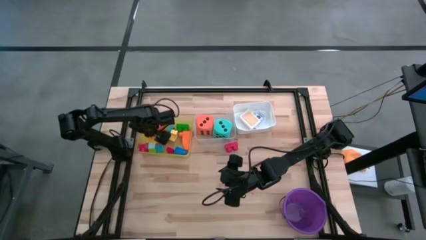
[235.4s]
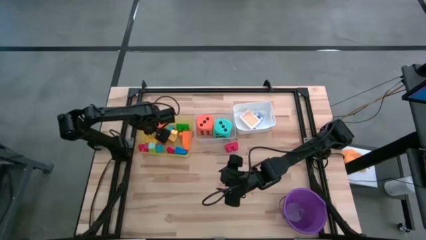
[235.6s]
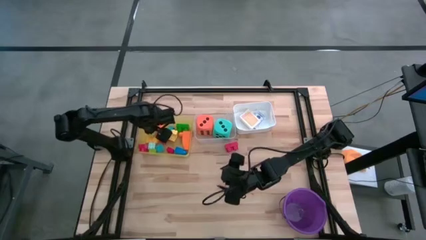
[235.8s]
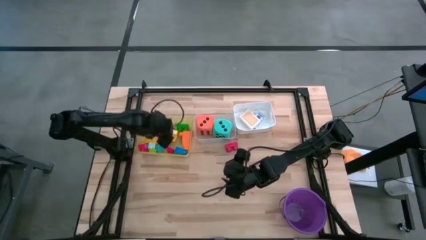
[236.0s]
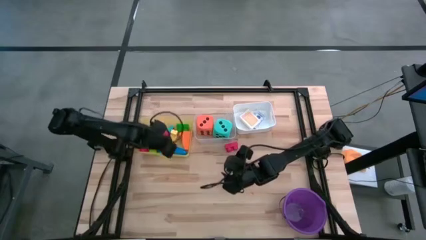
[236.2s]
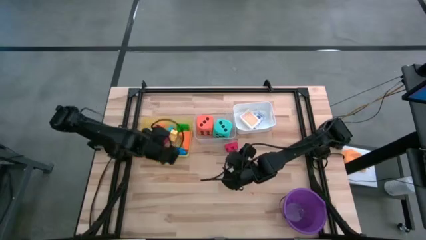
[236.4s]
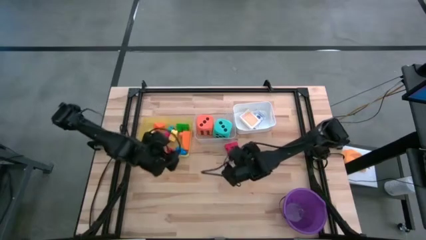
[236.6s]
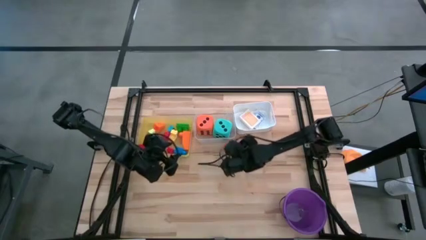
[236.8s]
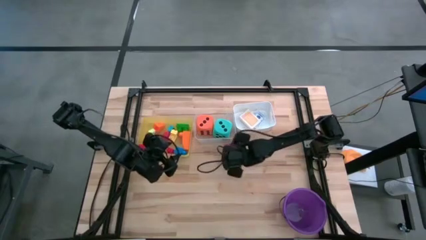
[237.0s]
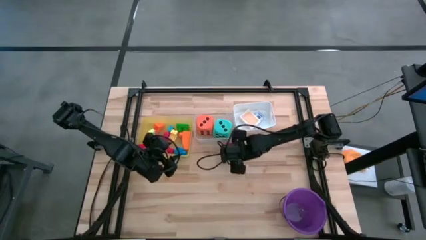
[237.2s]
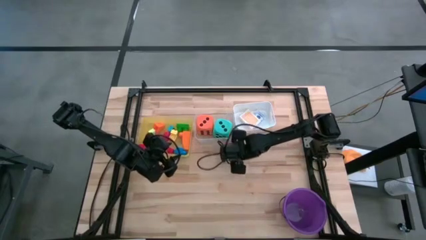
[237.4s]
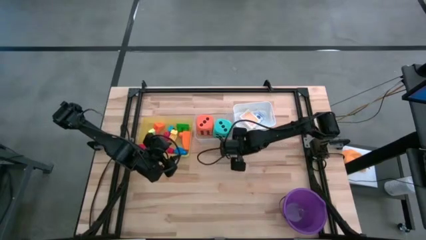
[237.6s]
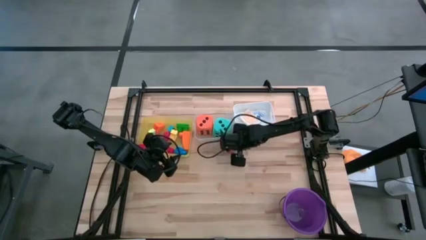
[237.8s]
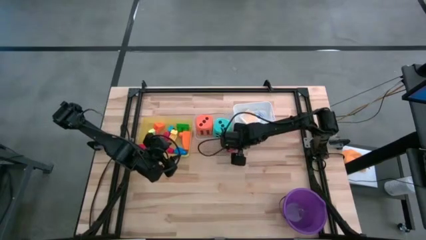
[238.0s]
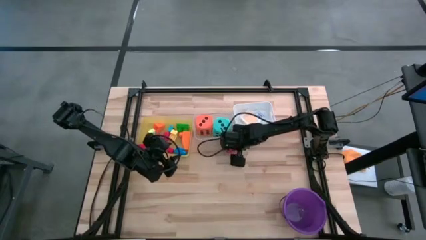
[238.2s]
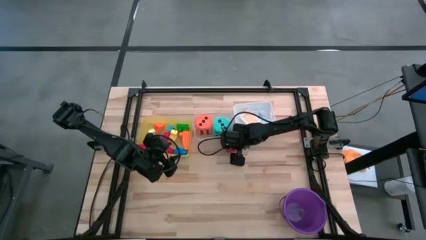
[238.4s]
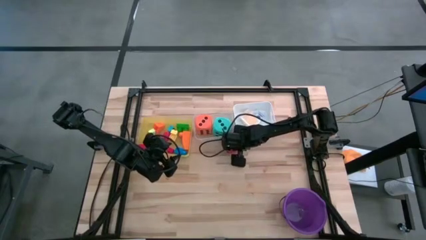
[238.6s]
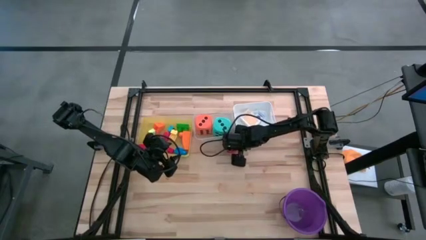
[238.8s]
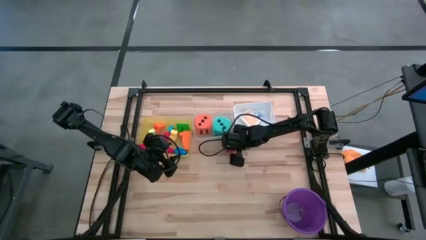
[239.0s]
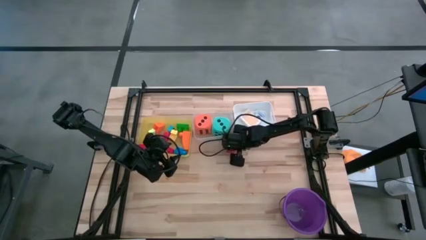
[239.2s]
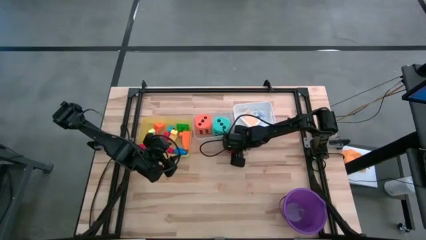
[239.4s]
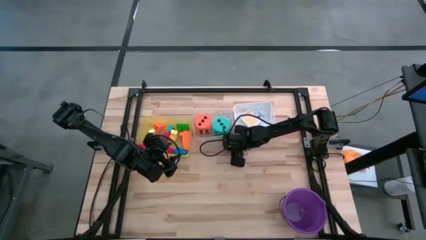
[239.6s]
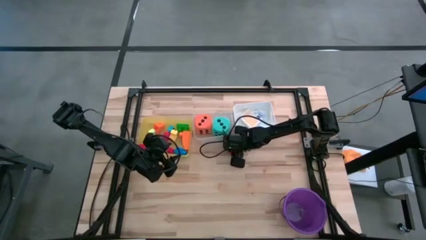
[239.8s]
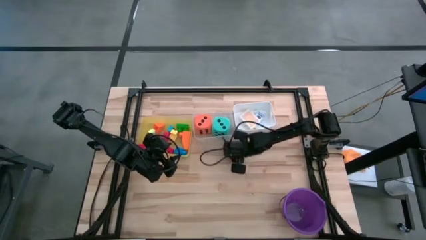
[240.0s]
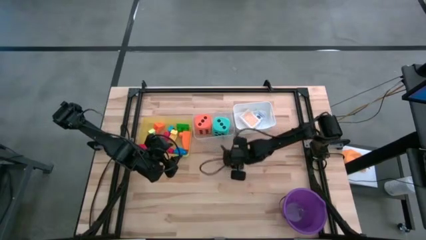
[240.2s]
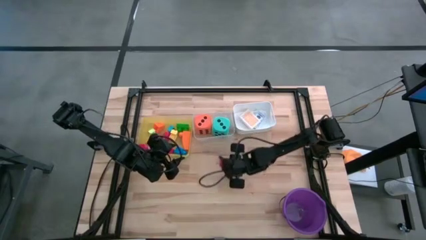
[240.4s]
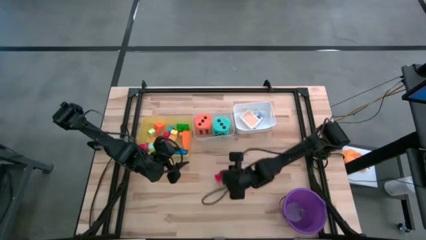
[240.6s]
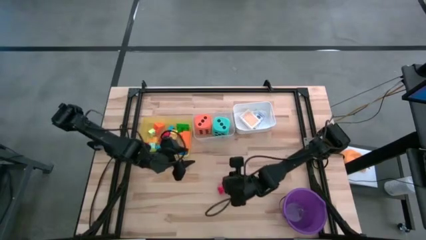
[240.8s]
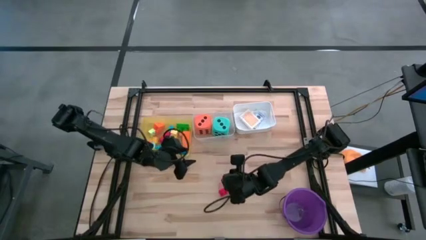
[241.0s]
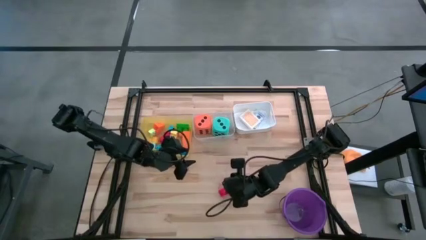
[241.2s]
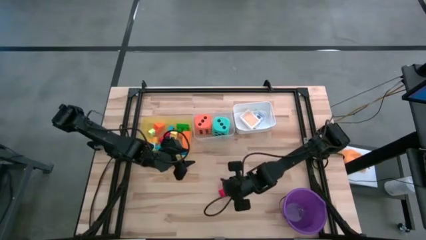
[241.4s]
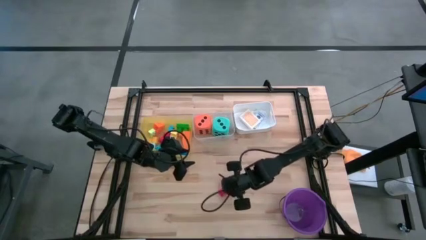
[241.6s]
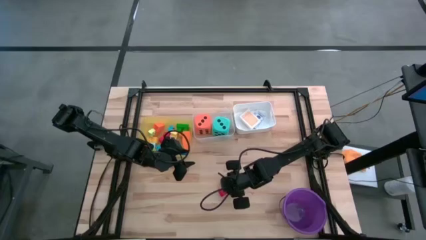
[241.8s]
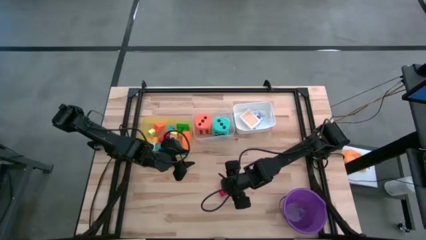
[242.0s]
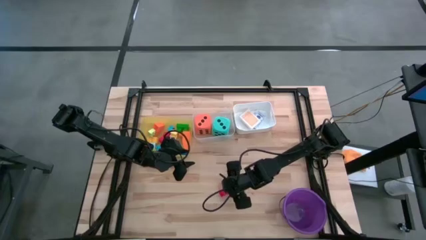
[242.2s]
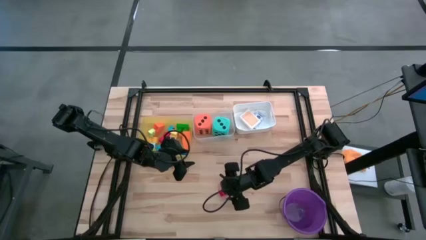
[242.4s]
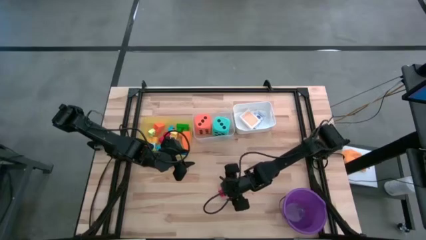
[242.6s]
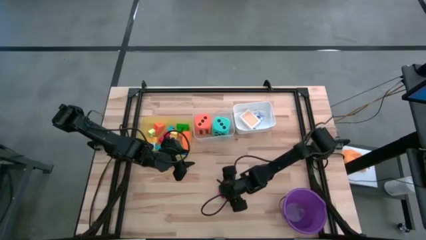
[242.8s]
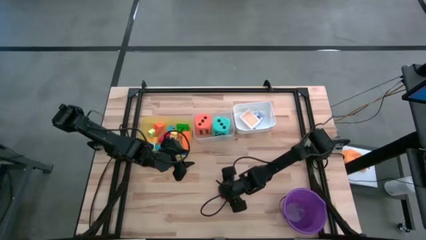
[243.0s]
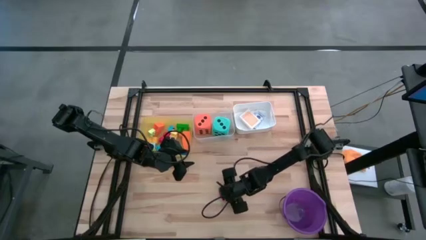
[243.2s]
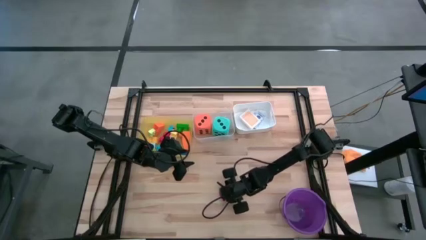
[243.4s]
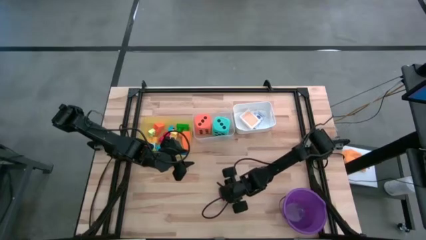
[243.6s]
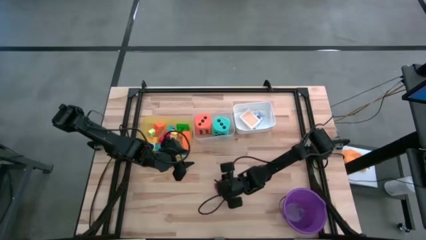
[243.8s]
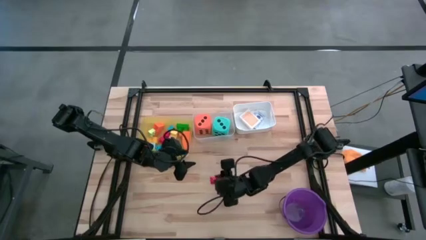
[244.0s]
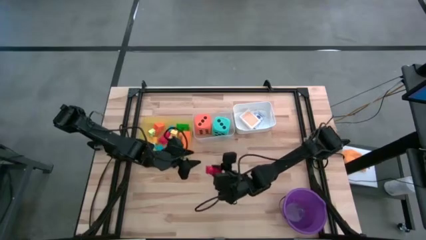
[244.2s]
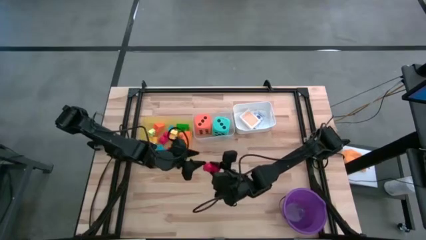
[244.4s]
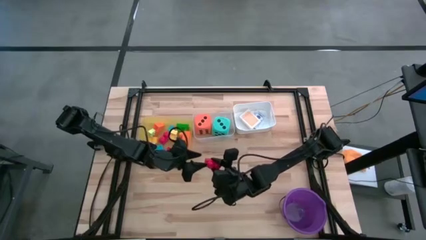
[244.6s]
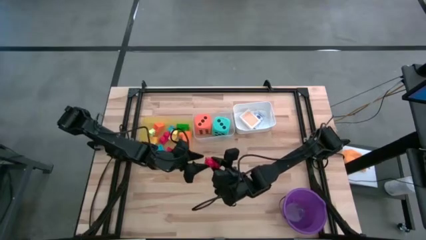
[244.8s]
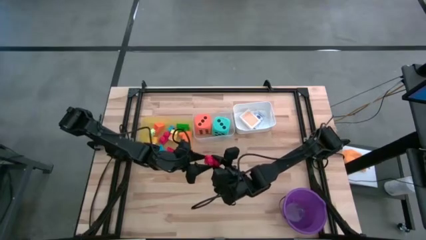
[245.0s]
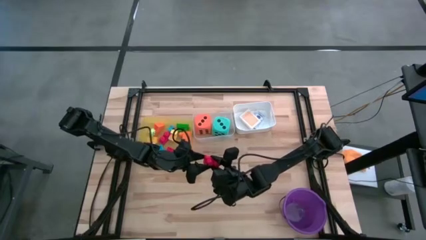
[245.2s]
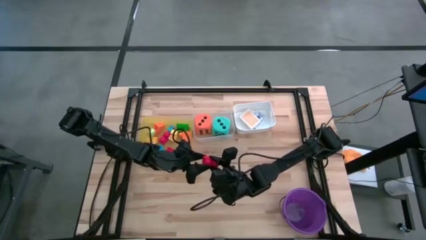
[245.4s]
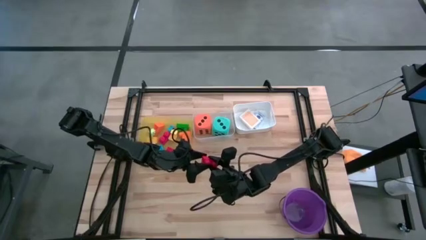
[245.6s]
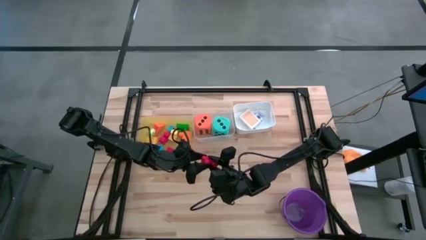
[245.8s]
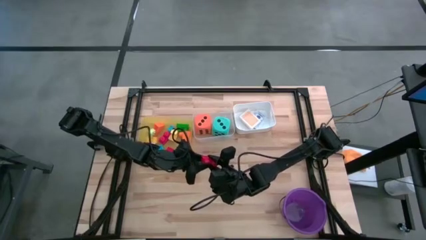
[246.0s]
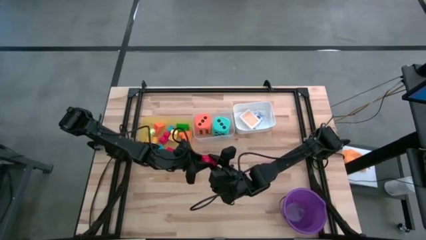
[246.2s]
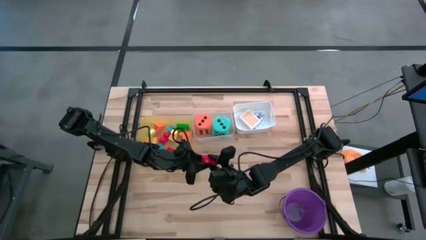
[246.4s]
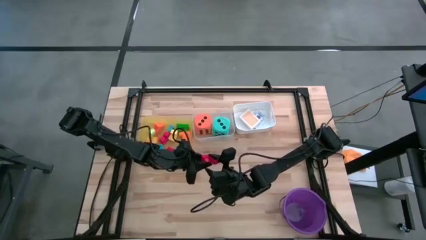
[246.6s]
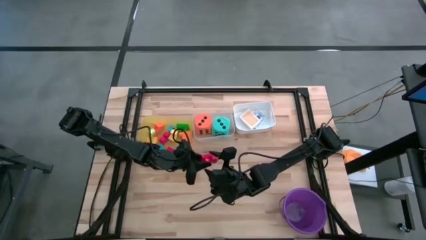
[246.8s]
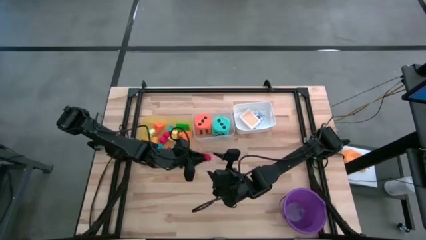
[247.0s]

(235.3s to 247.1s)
Task: Pick & Place Toys
Put the red game piece into the yellow bin

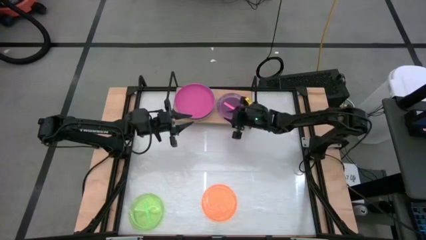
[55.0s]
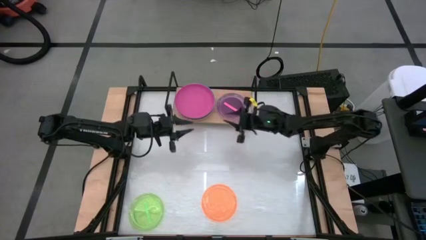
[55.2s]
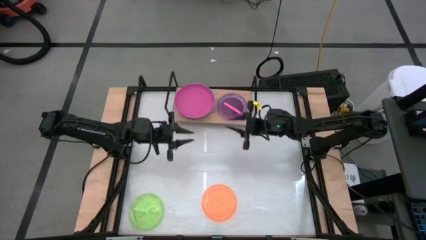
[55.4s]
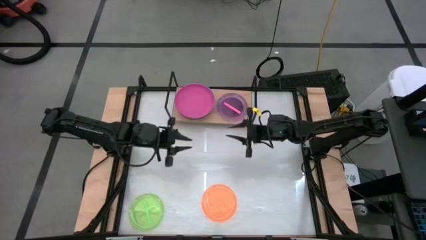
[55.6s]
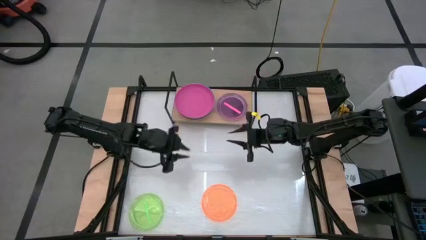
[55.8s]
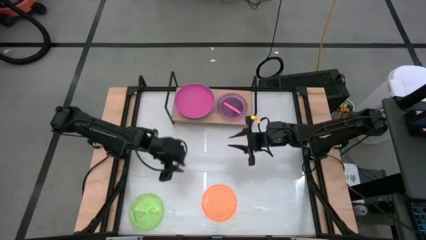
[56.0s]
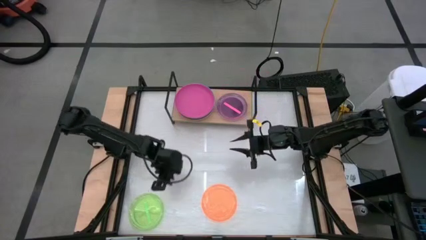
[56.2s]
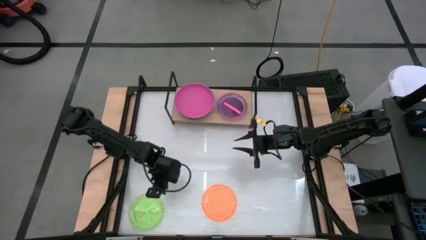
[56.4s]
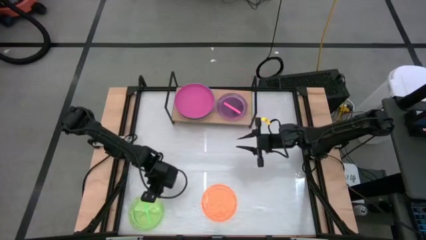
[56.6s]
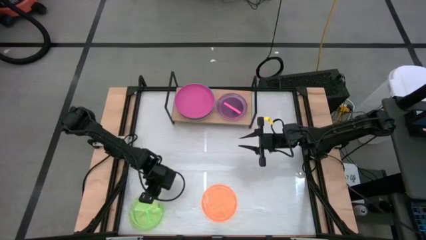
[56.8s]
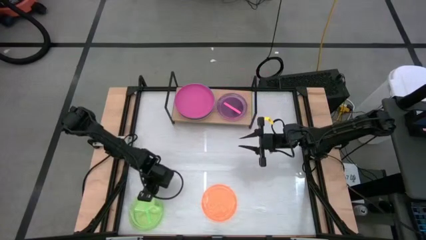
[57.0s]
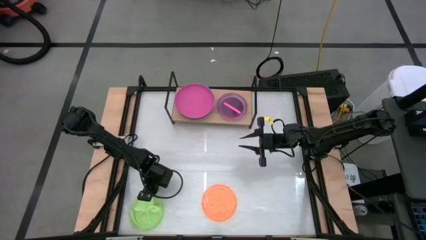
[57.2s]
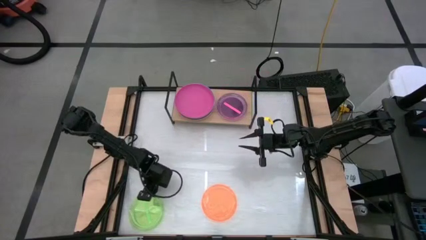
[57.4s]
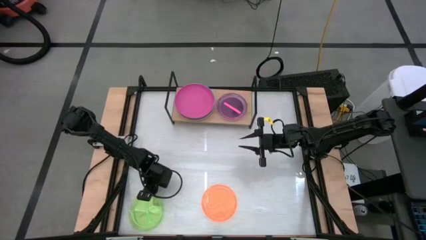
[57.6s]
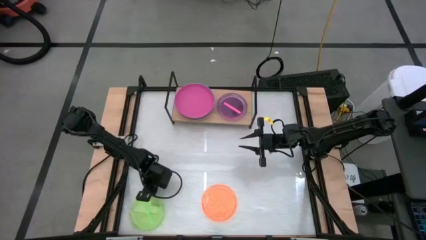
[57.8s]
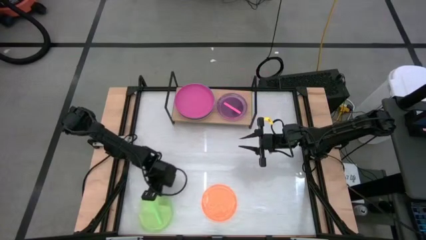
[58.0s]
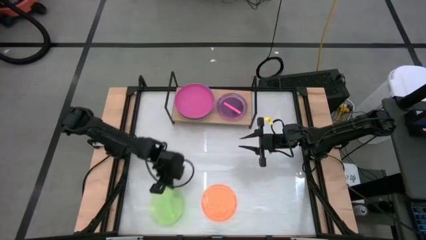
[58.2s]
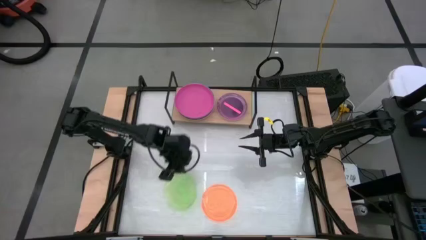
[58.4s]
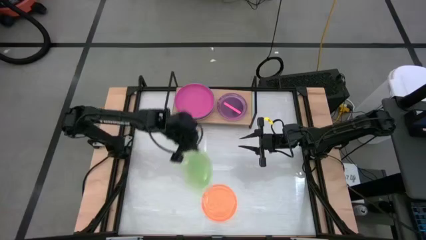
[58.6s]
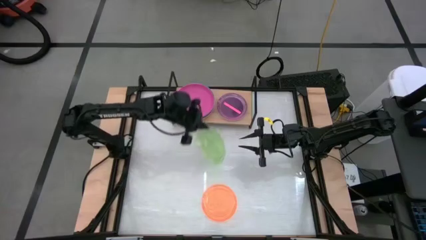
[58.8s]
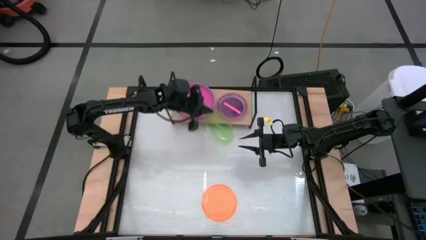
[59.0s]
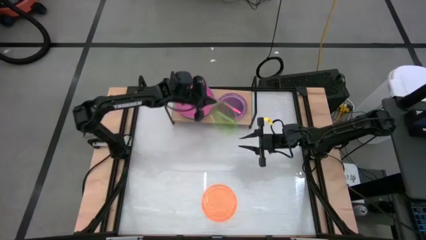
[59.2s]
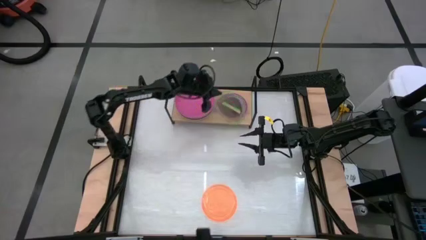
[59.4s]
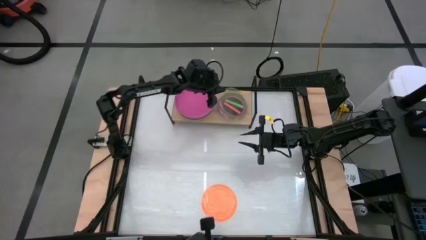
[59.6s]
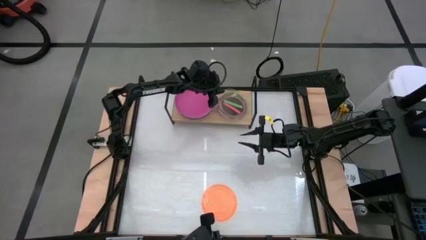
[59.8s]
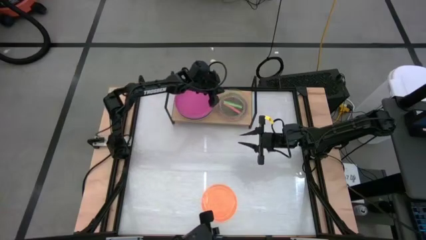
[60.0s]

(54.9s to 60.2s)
Task: Place and stack plates onto a shelf
Stack the transparent green plate on top of the transparent pink plate on the shelf
